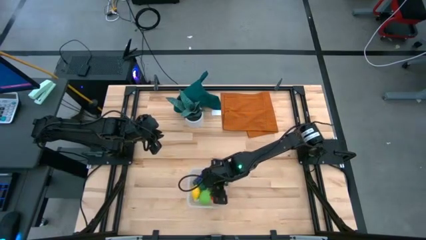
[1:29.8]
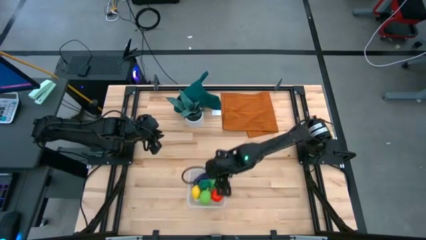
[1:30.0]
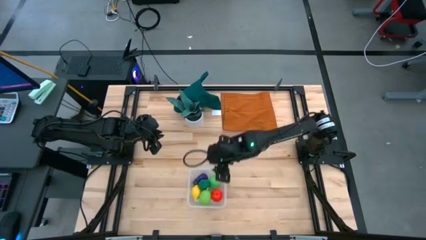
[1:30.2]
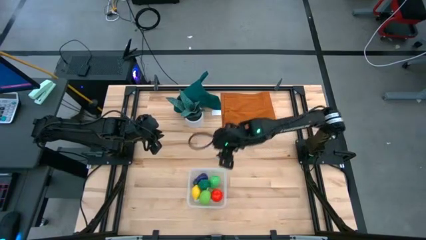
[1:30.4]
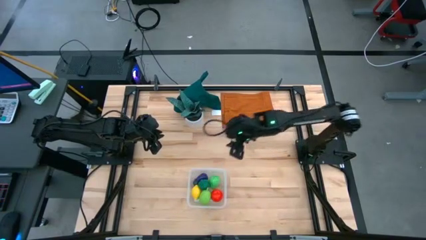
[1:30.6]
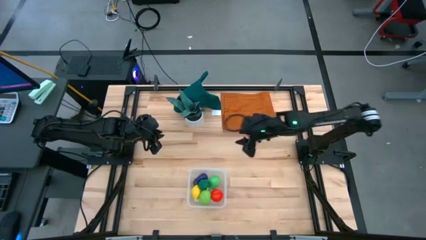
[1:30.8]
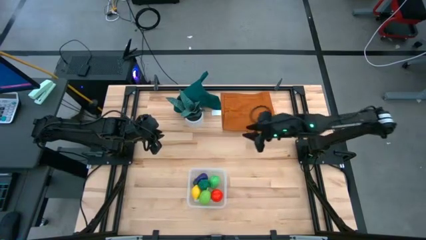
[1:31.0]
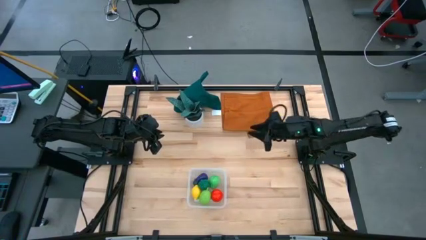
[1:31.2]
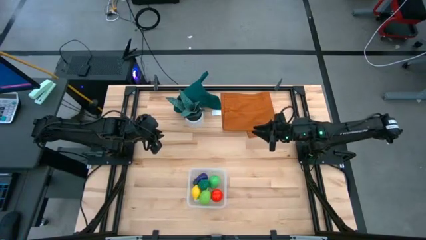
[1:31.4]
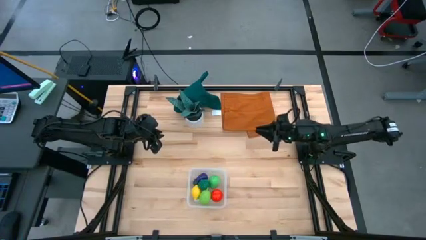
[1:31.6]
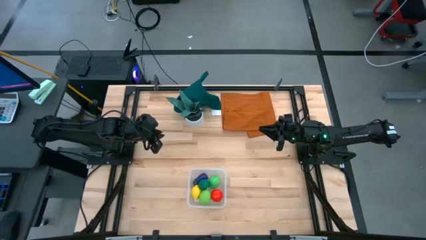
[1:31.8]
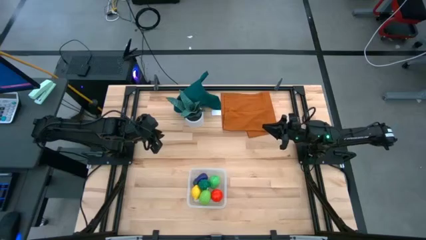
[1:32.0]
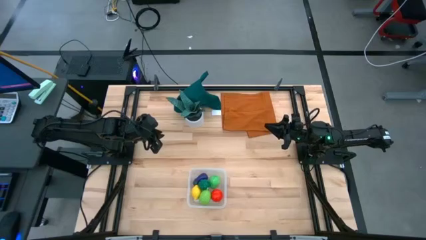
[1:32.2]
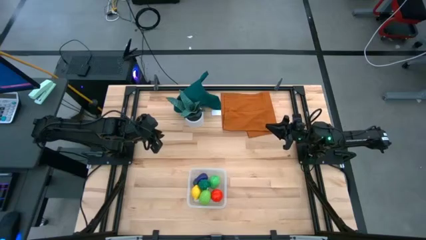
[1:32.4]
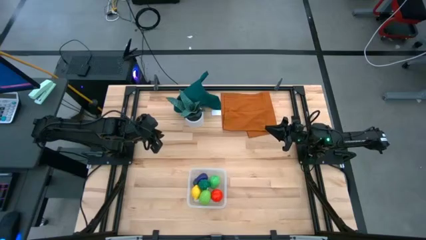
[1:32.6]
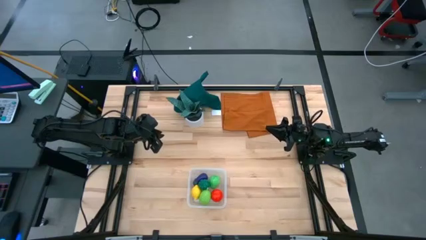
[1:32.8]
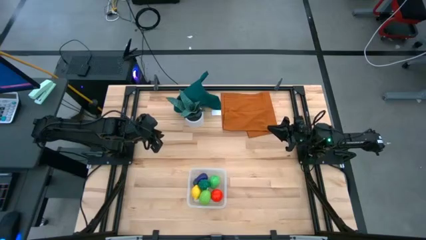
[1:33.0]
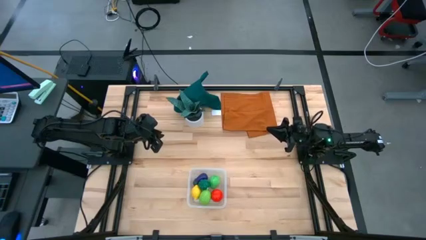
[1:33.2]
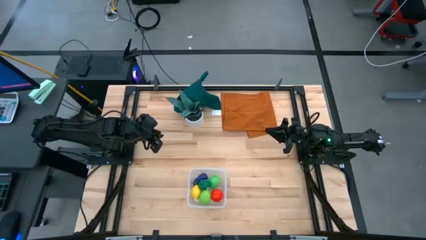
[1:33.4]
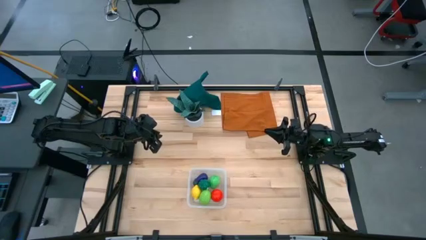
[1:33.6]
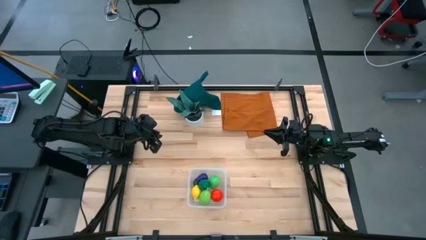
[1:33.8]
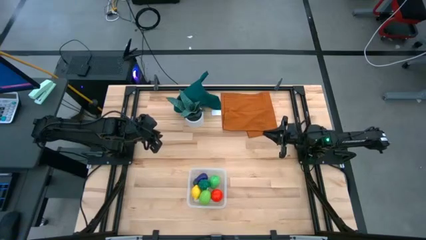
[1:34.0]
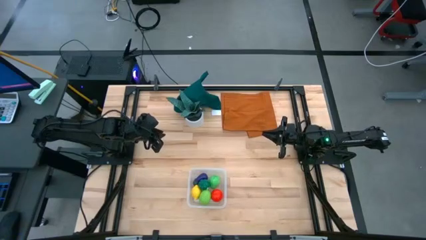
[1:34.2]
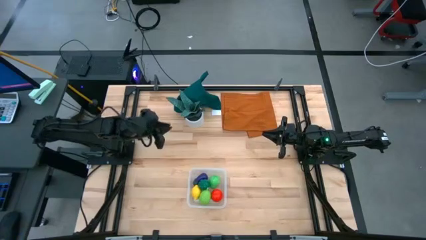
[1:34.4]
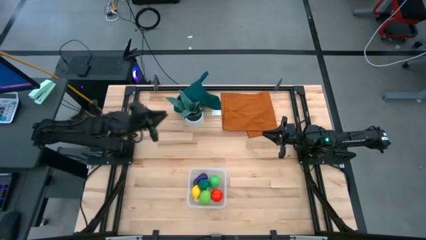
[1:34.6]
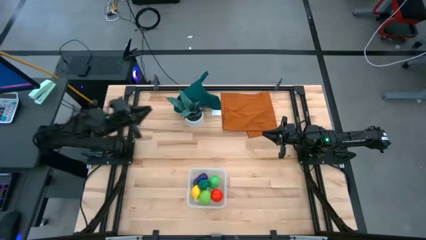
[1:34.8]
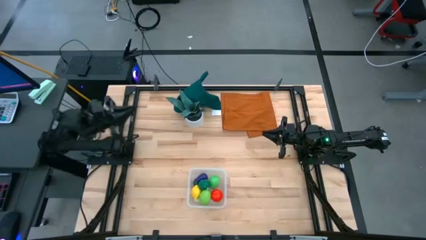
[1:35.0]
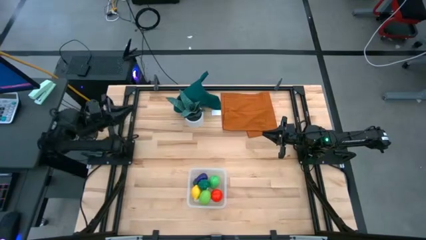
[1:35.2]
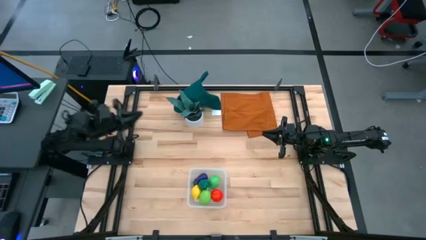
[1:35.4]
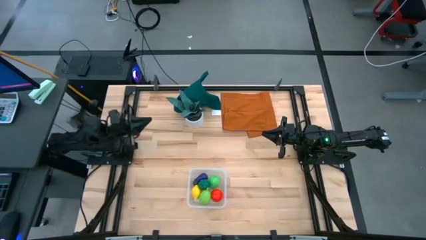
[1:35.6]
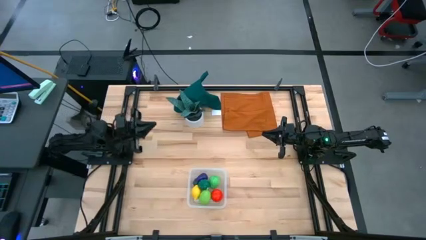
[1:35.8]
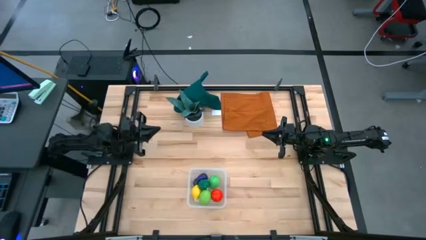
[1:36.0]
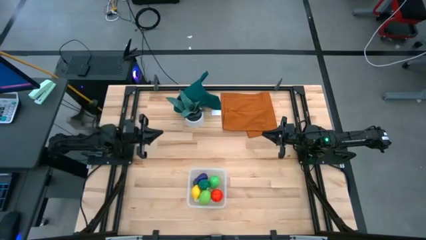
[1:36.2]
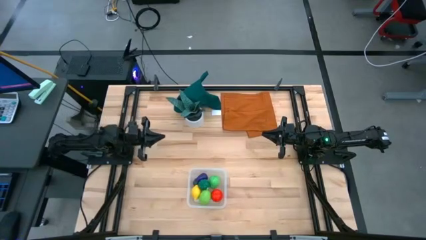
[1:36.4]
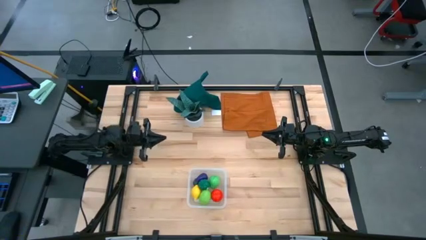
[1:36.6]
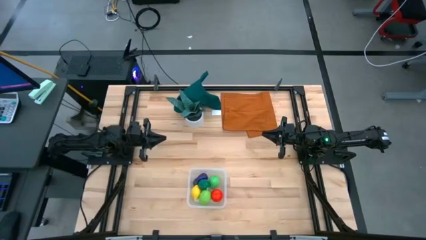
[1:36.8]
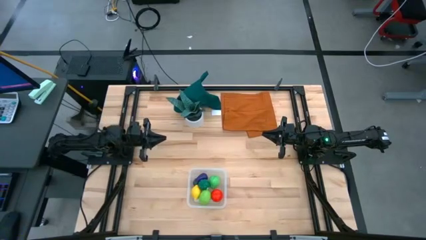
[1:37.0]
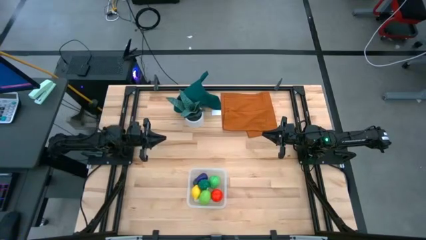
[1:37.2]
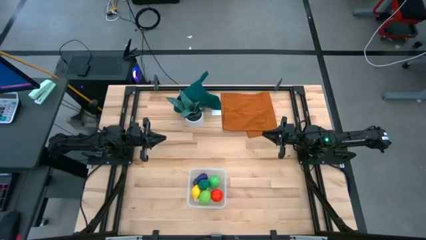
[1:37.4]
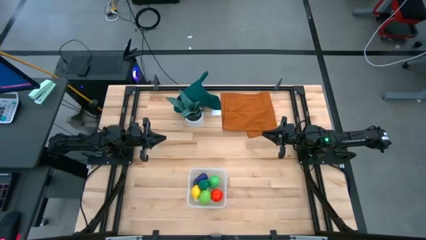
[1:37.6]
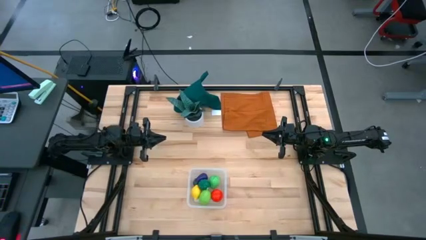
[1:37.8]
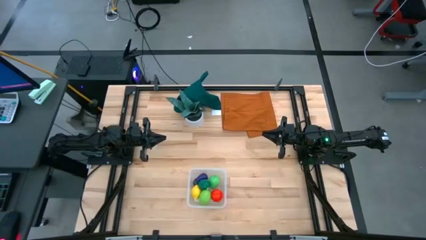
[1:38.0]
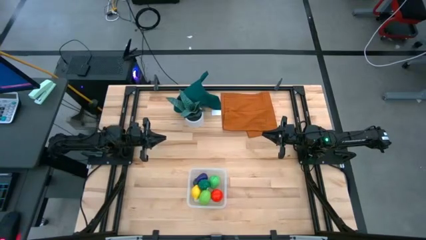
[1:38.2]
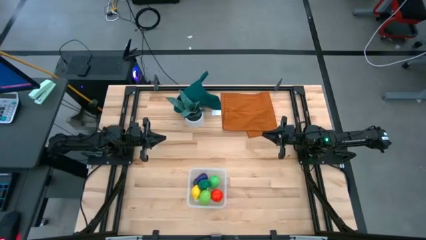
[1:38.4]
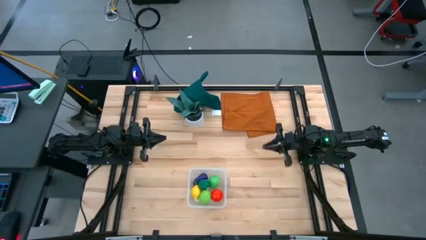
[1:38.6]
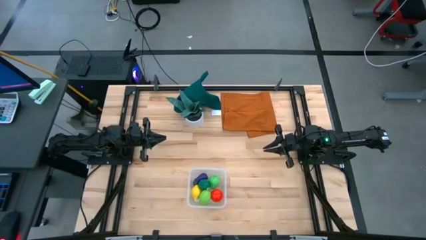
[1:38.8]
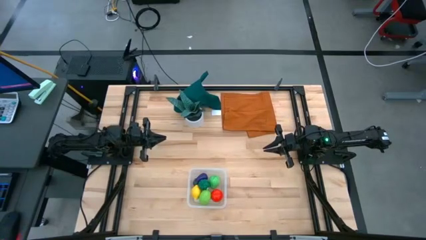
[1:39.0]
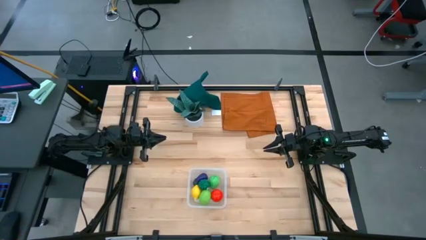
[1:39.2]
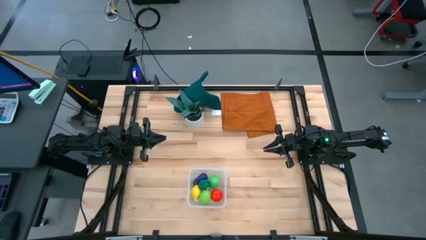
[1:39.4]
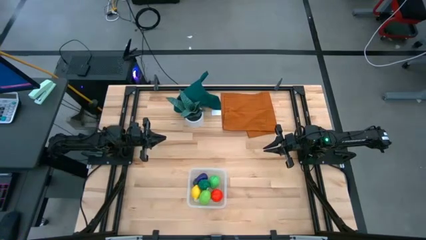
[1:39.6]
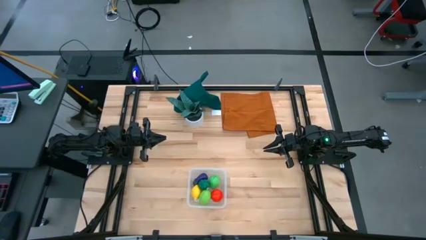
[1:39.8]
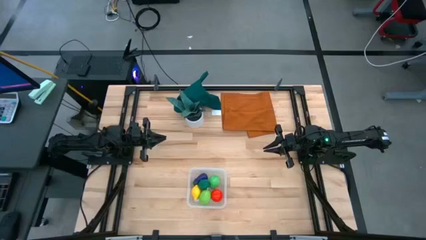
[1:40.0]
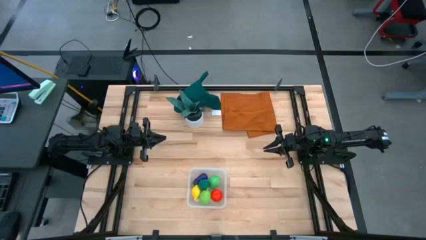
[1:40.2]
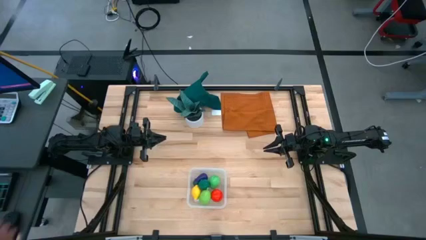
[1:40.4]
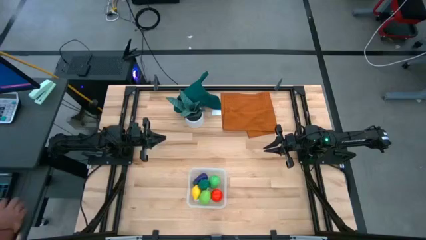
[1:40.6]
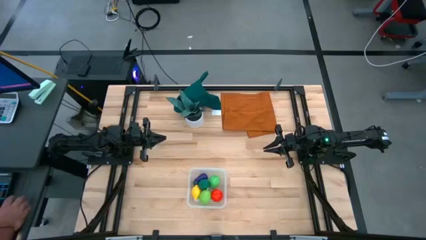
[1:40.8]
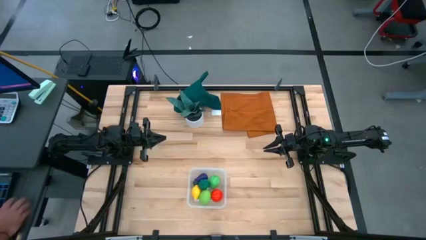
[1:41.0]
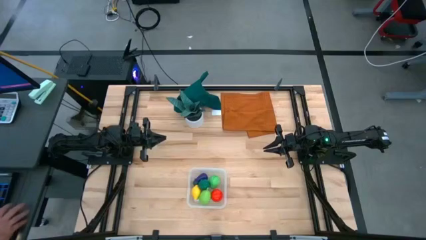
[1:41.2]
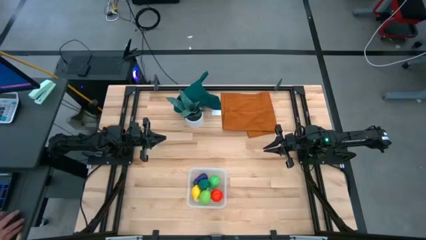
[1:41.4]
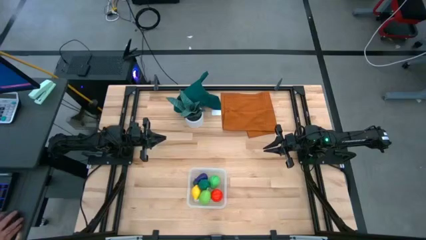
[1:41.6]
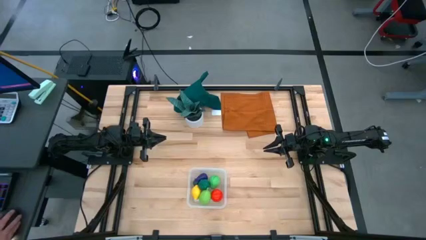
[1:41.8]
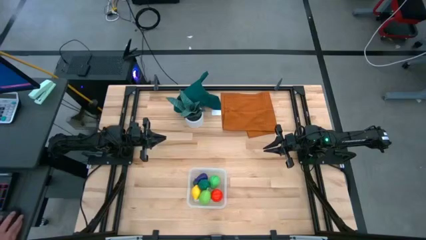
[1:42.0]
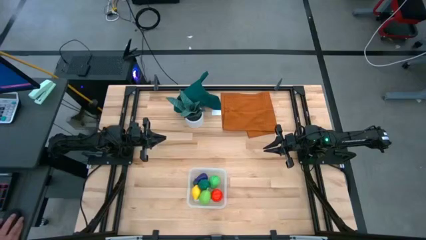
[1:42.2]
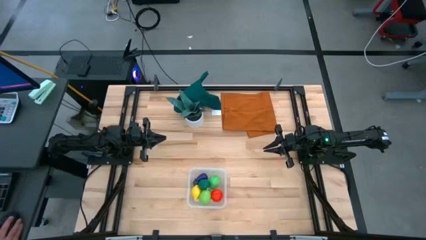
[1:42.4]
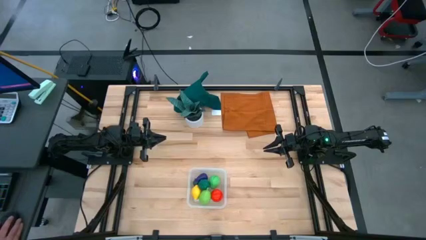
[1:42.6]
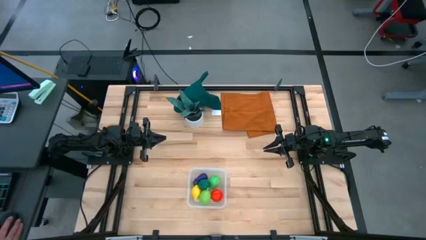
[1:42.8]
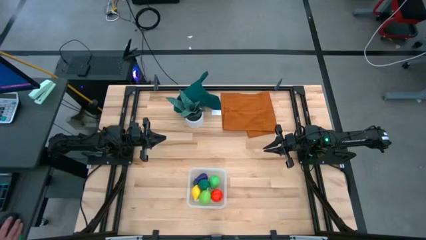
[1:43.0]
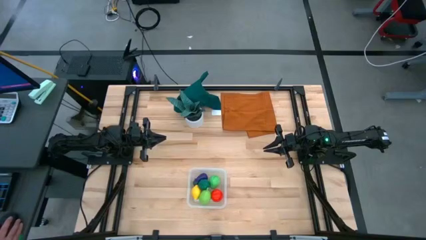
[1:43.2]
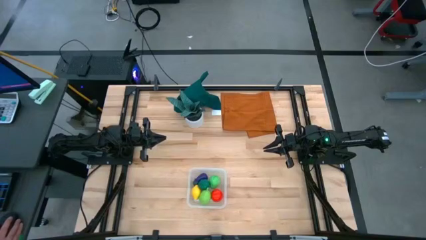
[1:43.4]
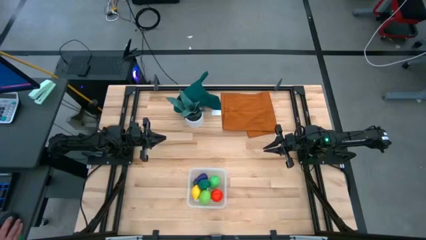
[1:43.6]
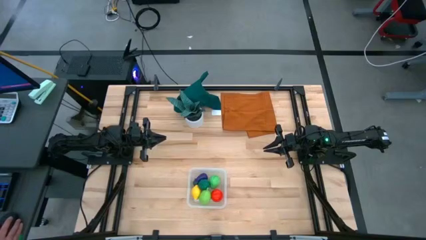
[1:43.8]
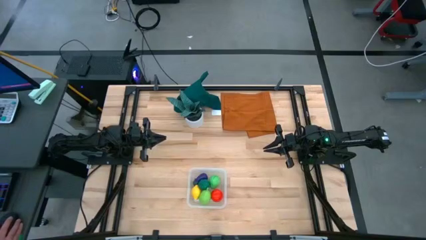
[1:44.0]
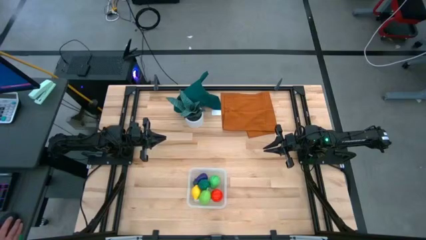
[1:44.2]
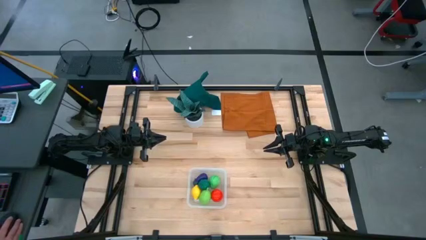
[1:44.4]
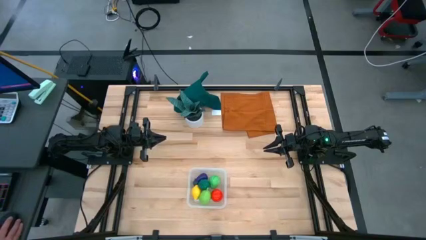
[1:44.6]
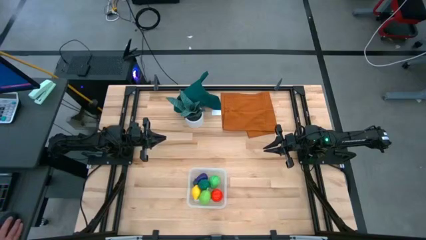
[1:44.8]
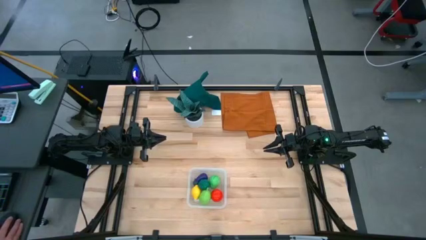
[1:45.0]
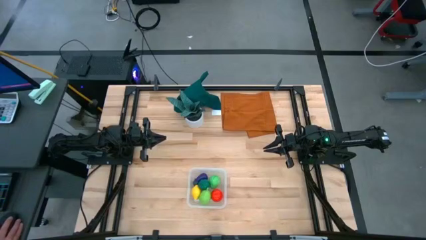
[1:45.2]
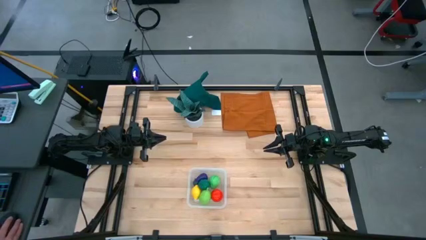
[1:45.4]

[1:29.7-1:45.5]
Task: Pick and placing Produce into tupperware
Return to Home Position
